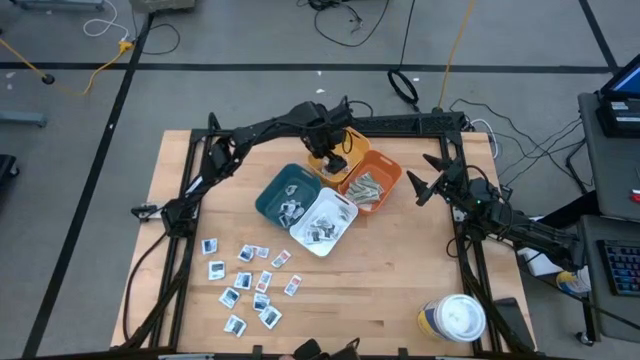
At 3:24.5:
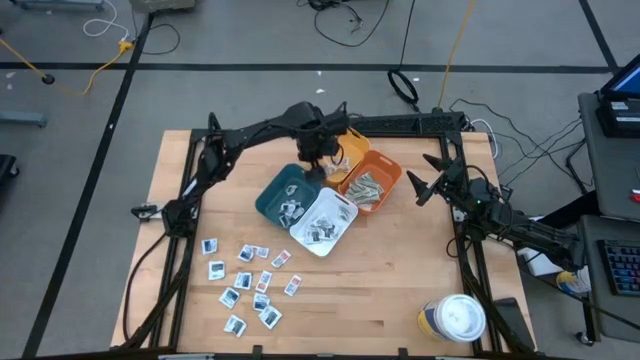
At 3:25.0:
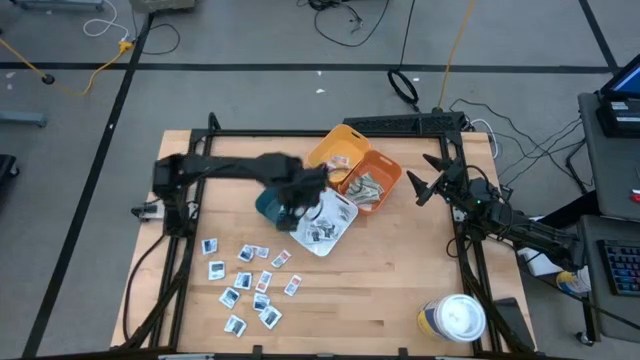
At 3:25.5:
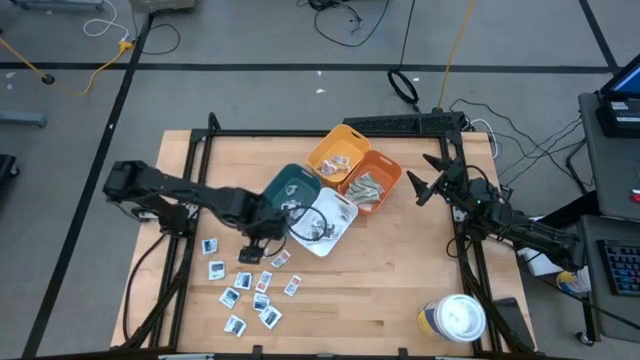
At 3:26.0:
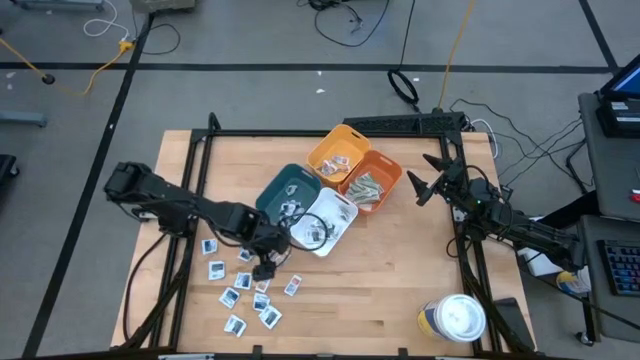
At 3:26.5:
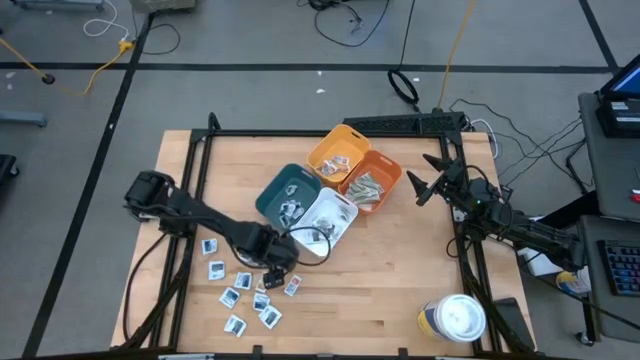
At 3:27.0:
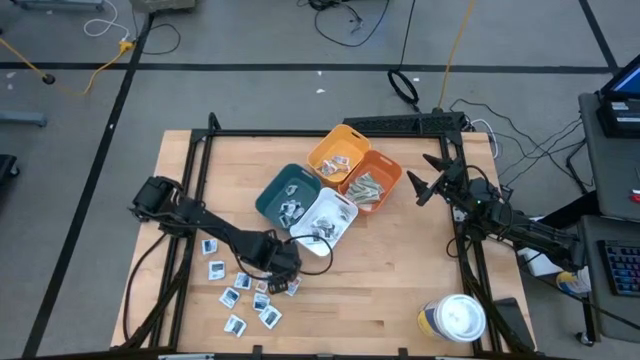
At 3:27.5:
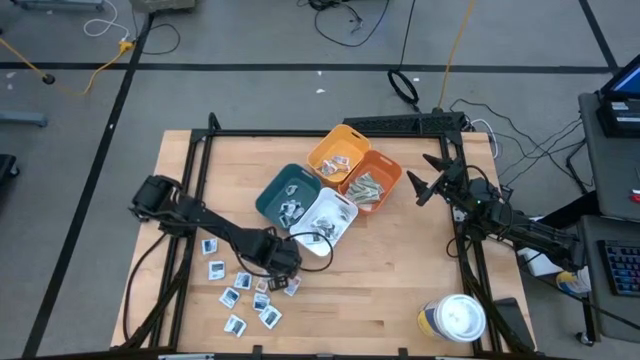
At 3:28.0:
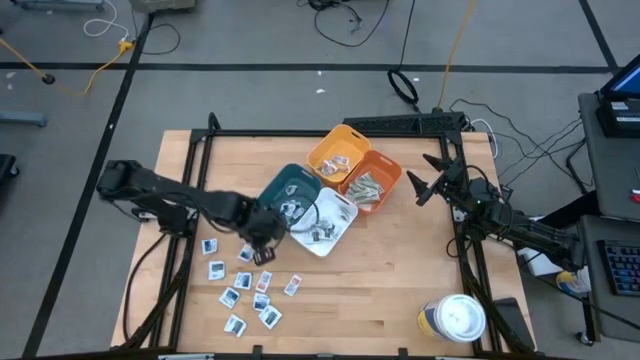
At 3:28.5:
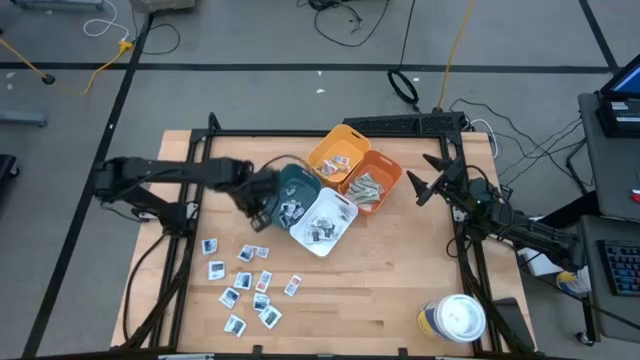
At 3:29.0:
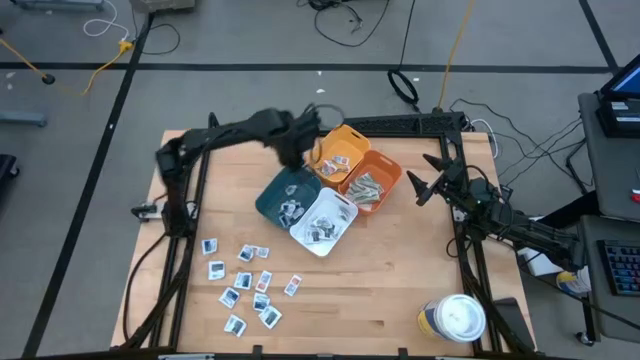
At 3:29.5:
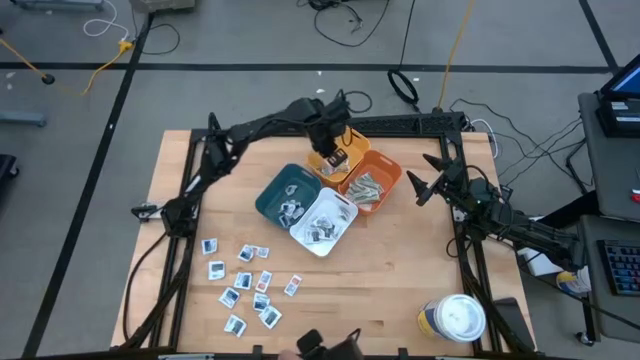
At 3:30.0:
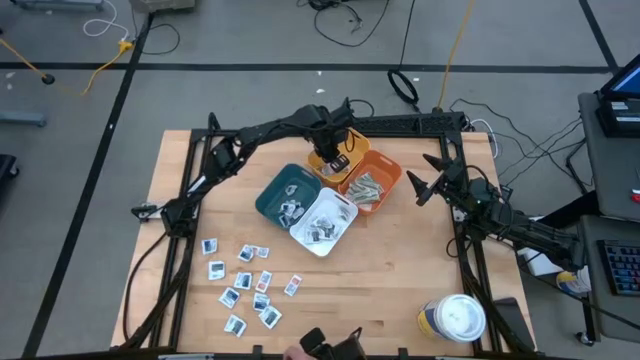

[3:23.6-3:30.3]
Task: Pick & Place First Aid Supplies
Put the orange ointment pack into the yellow bin

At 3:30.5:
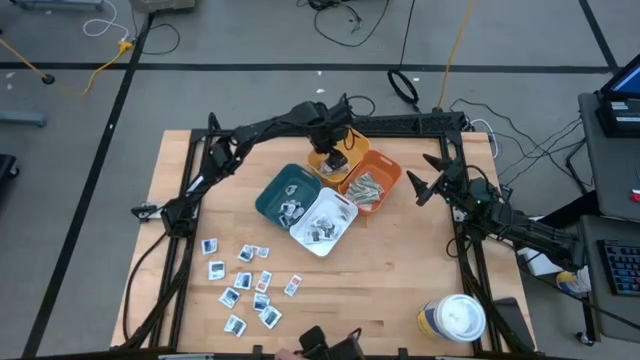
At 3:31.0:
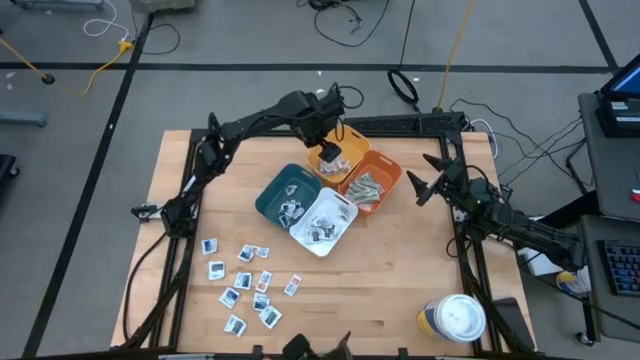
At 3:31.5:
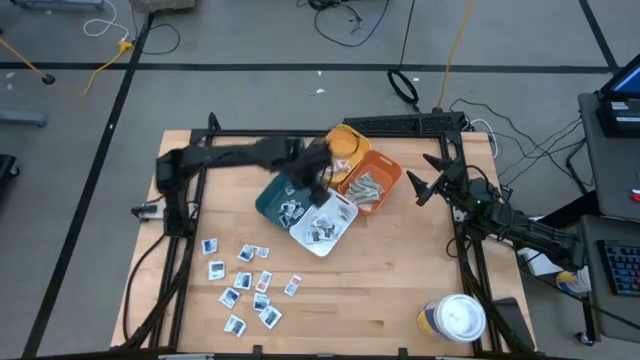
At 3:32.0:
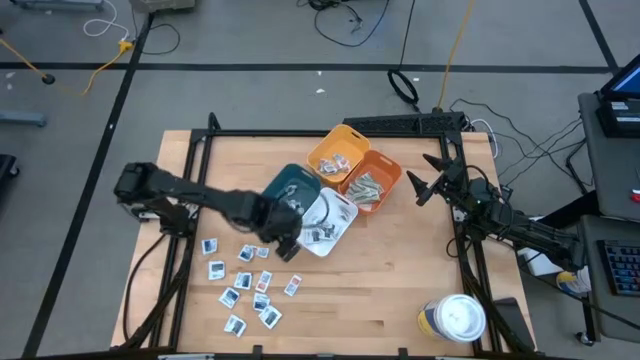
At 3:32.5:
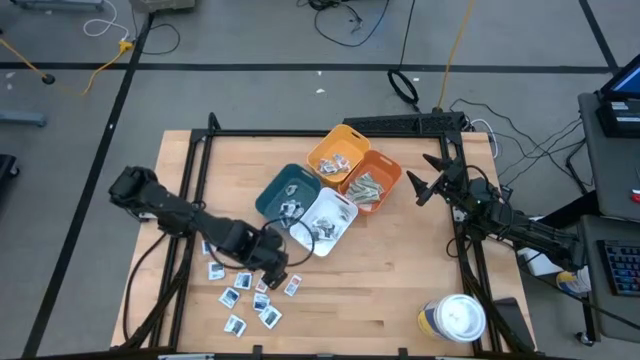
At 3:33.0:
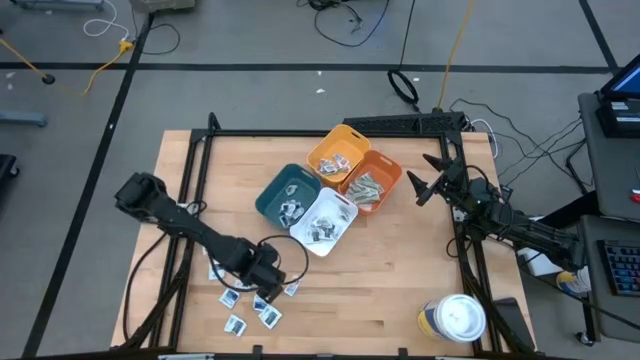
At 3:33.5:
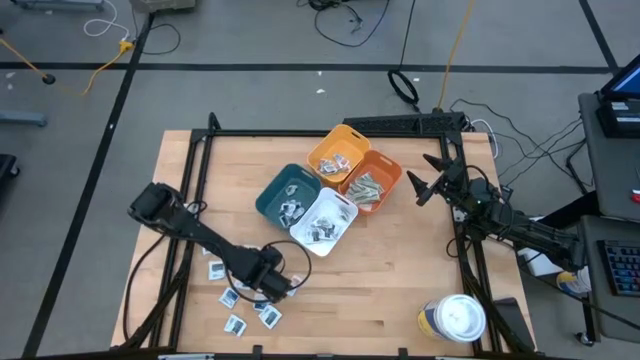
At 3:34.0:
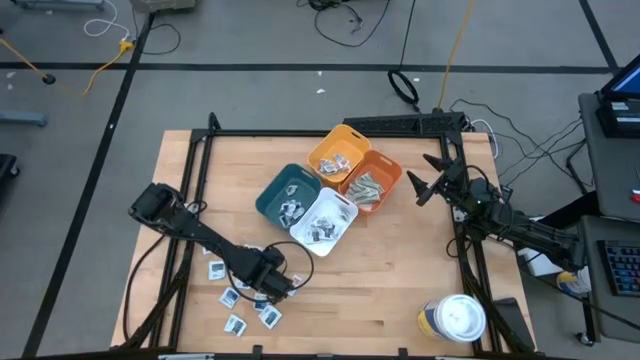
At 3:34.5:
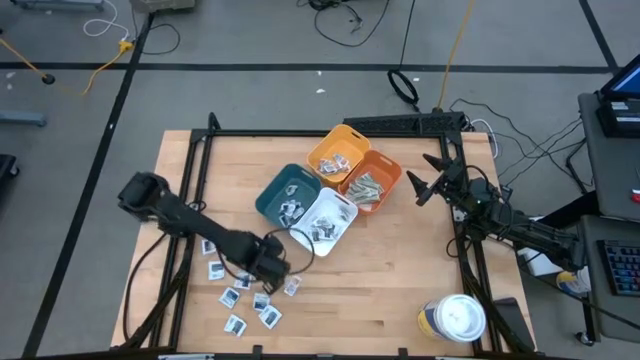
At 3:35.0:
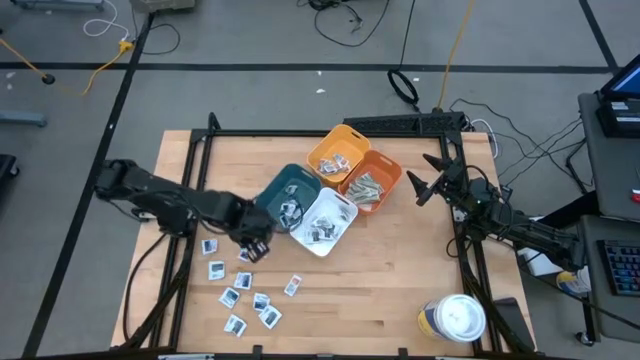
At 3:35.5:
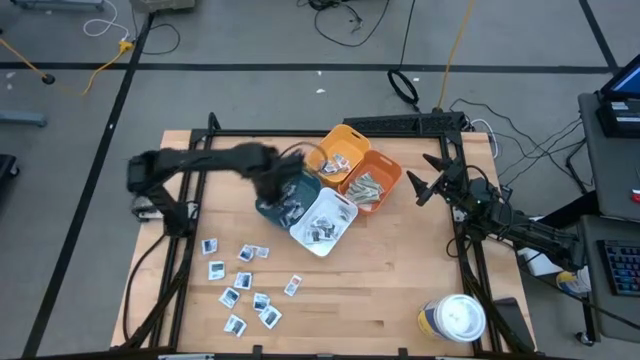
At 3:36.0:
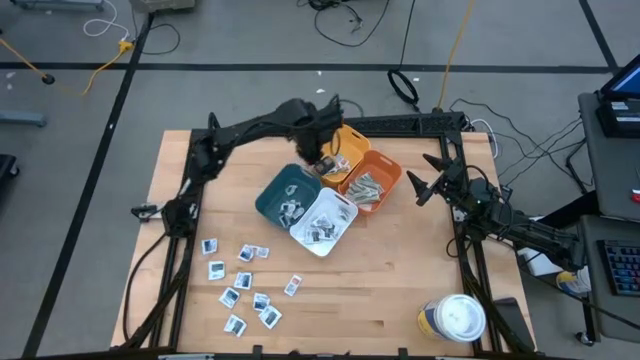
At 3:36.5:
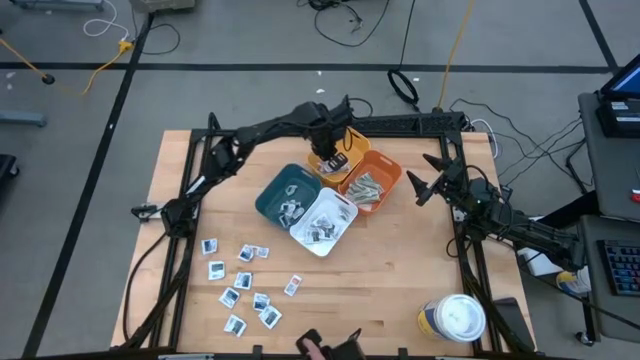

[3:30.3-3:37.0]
Put the orange ointment pack into the yellow bin

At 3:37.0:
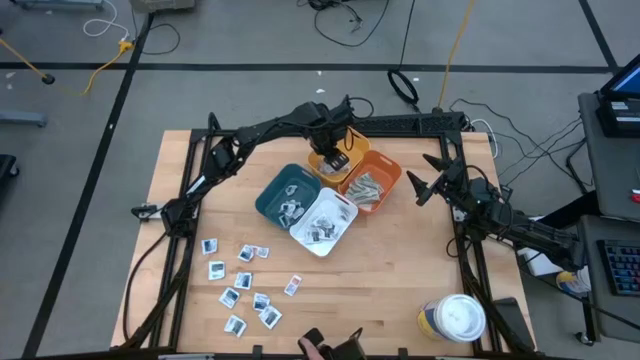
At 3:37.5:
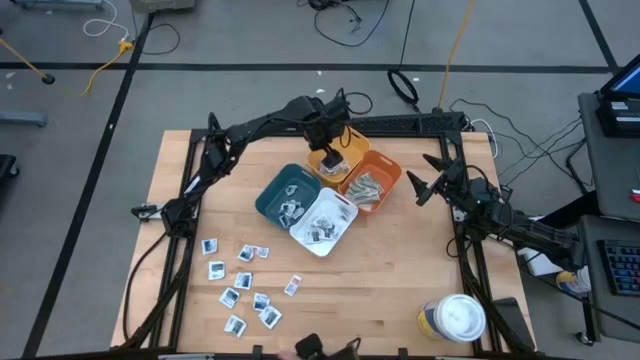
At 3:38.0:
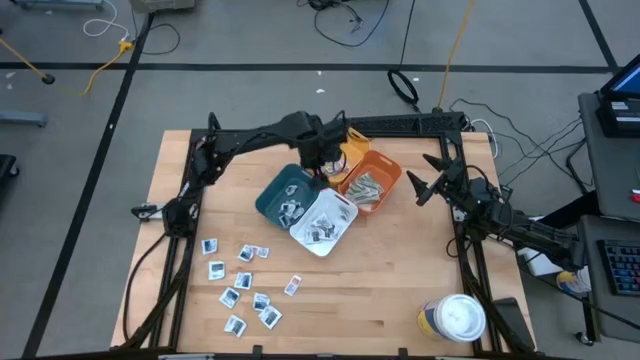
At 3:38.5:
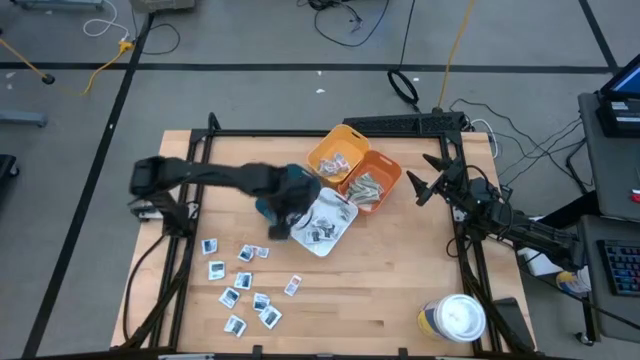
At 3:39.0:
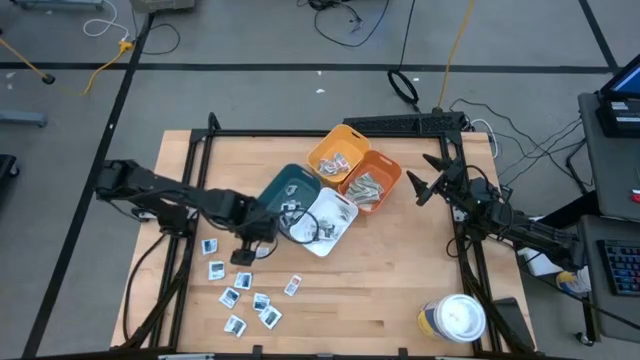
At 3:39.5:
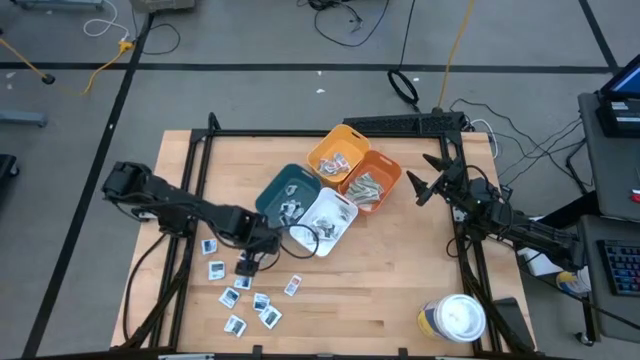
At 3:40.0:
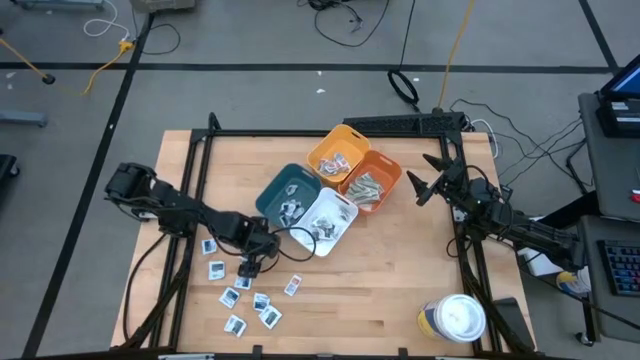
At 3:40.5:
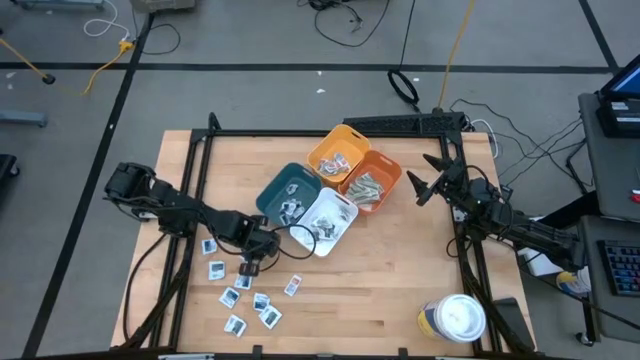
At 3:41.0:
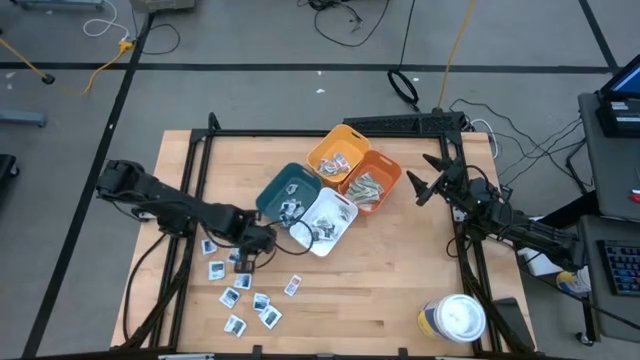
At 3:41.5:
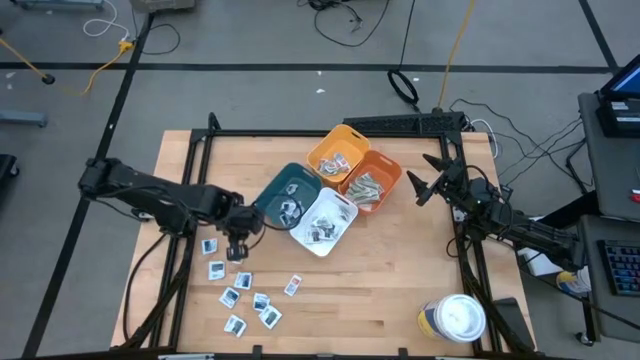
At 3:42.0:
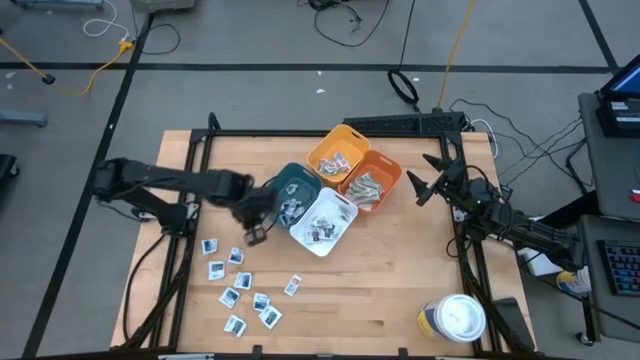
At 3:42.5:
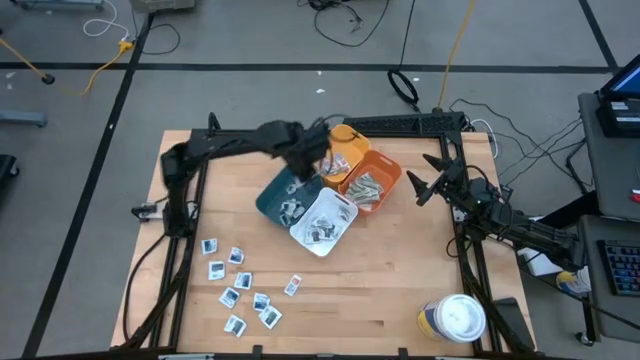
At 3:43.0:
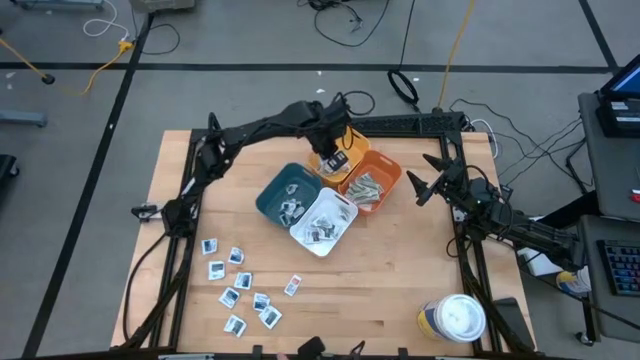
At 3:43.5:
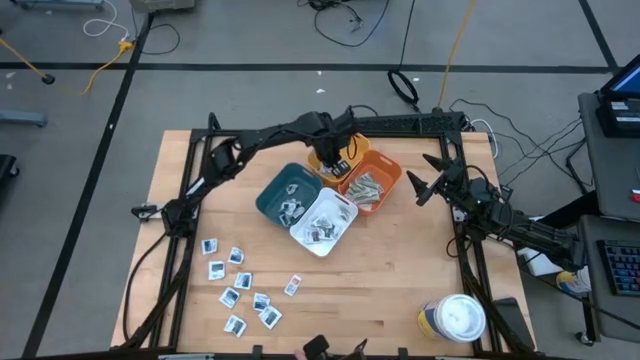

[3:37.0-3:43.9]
Put the orange ointment pack into the yellow bin
